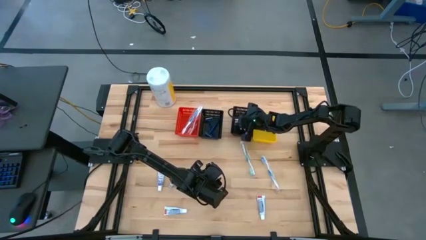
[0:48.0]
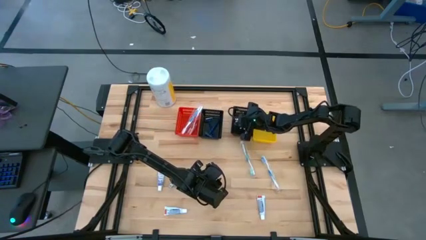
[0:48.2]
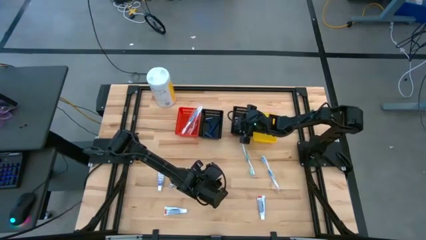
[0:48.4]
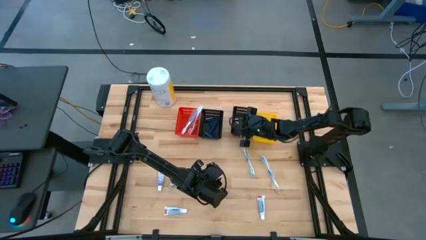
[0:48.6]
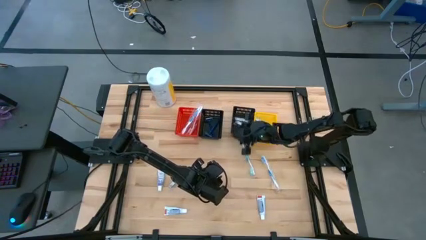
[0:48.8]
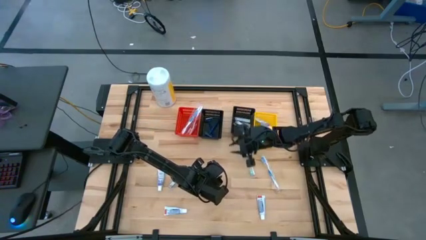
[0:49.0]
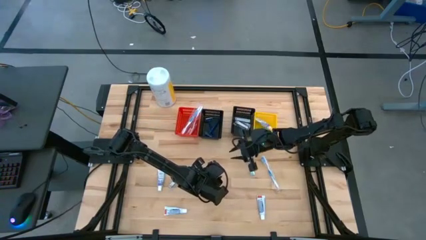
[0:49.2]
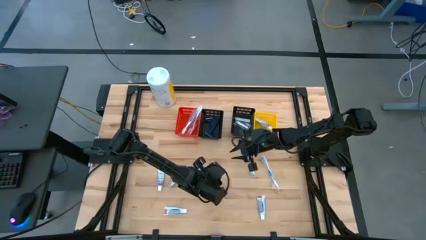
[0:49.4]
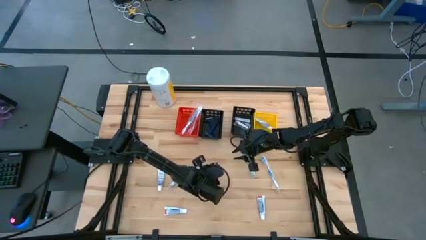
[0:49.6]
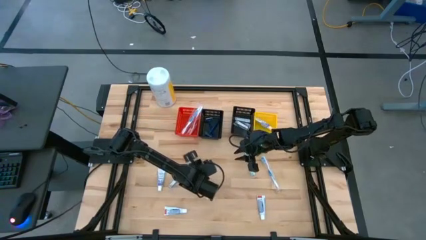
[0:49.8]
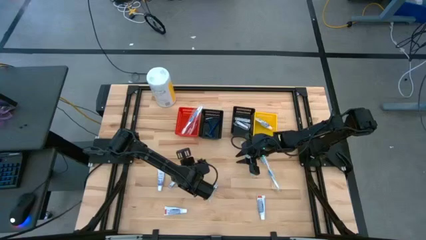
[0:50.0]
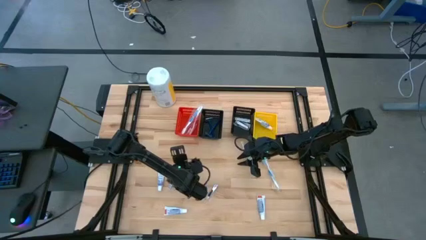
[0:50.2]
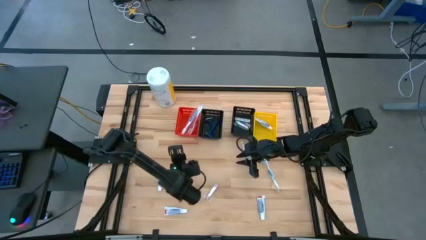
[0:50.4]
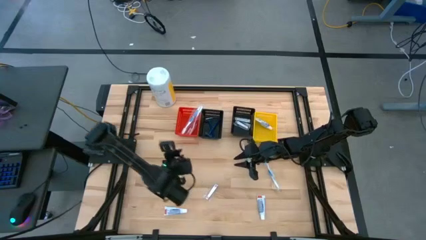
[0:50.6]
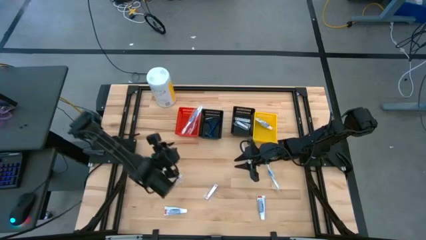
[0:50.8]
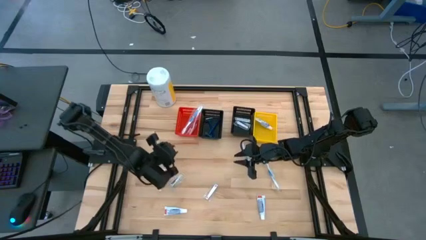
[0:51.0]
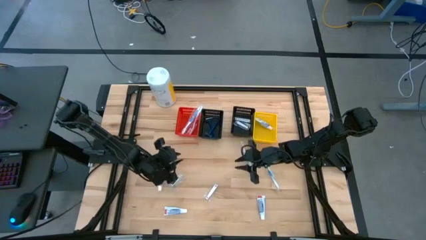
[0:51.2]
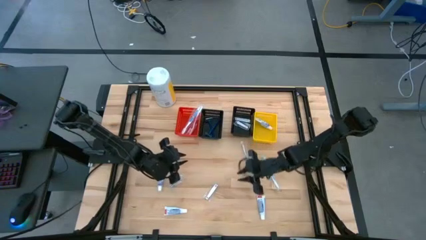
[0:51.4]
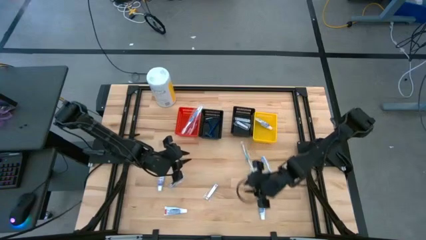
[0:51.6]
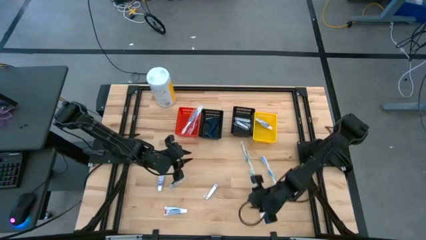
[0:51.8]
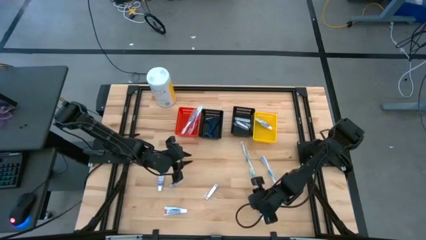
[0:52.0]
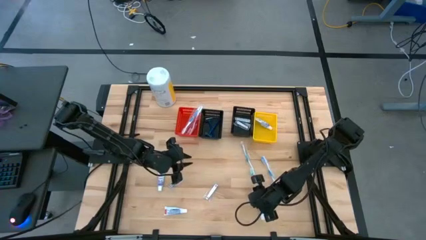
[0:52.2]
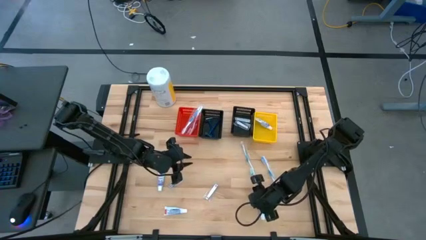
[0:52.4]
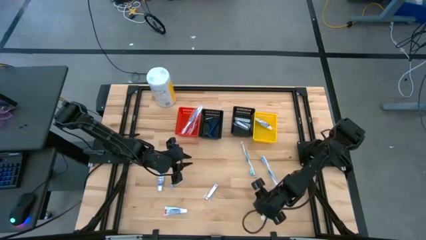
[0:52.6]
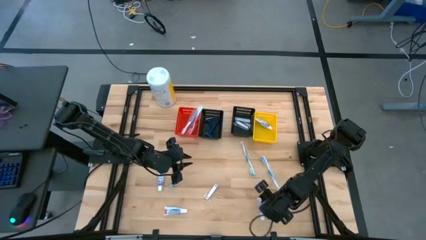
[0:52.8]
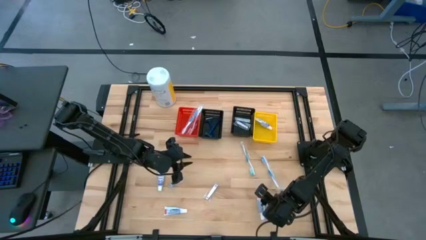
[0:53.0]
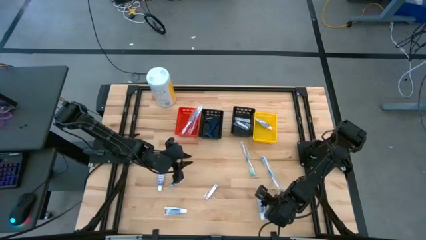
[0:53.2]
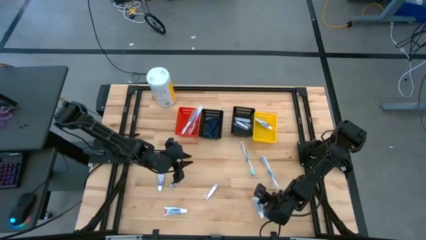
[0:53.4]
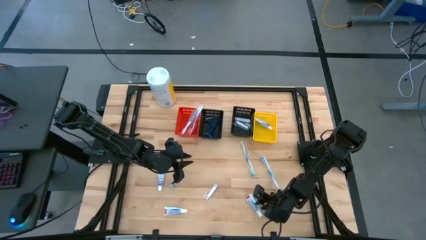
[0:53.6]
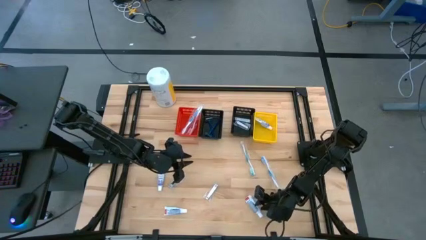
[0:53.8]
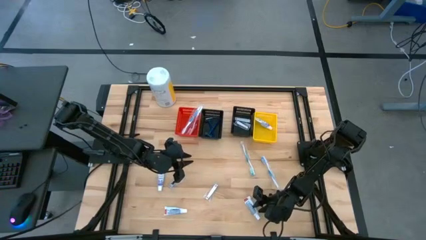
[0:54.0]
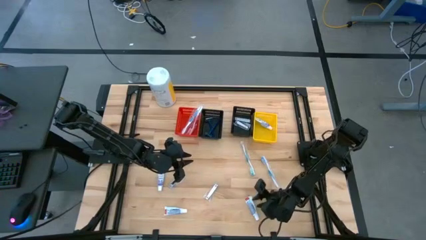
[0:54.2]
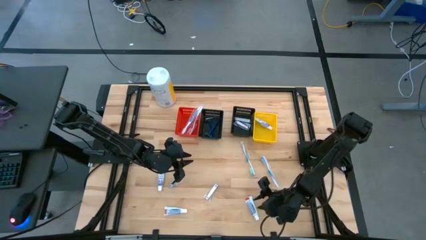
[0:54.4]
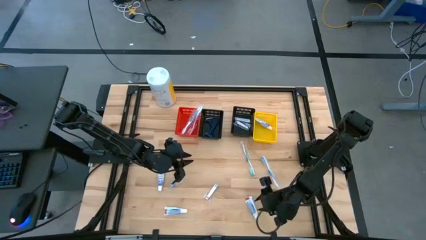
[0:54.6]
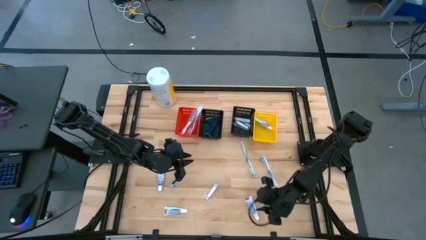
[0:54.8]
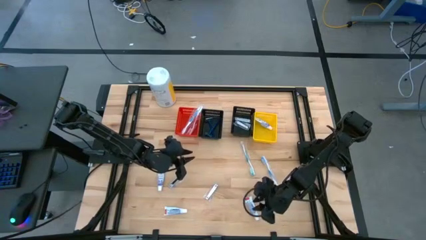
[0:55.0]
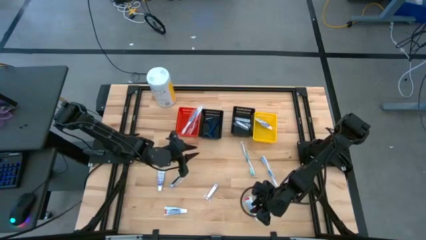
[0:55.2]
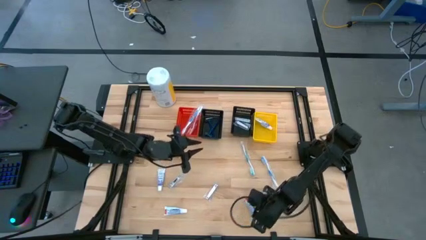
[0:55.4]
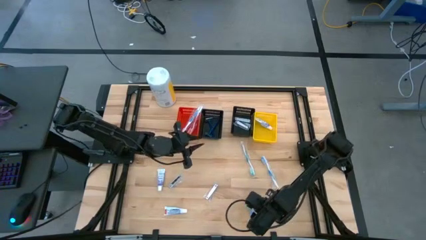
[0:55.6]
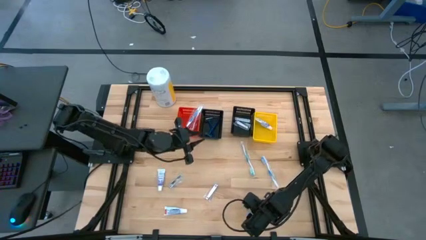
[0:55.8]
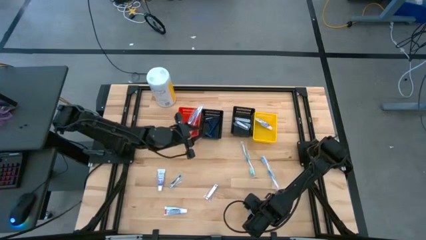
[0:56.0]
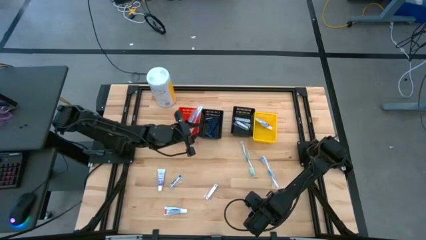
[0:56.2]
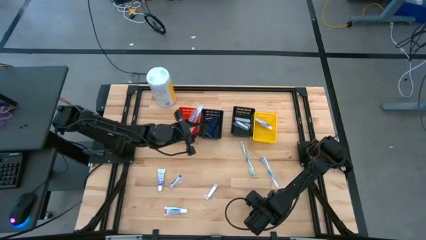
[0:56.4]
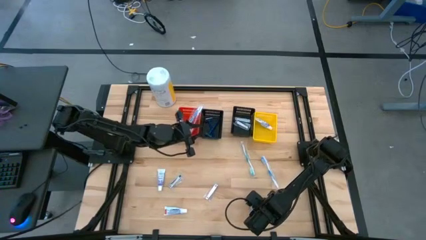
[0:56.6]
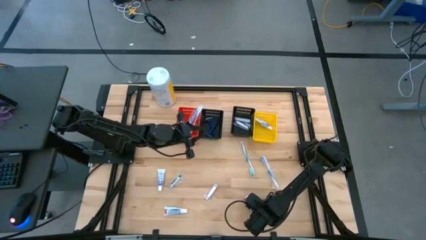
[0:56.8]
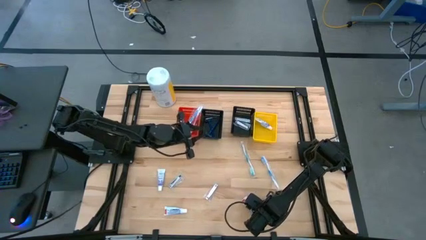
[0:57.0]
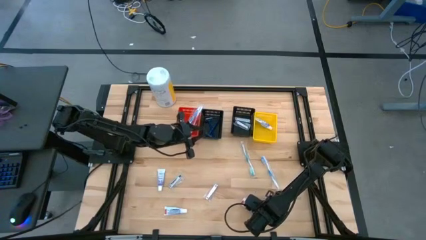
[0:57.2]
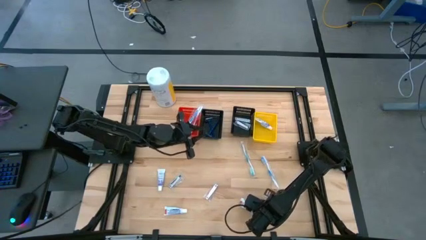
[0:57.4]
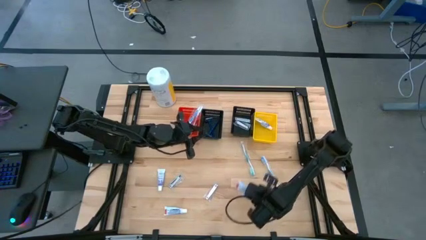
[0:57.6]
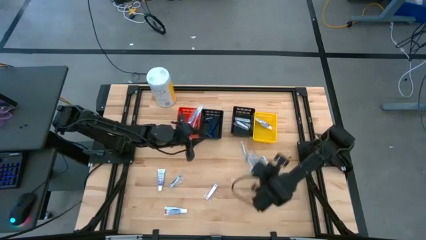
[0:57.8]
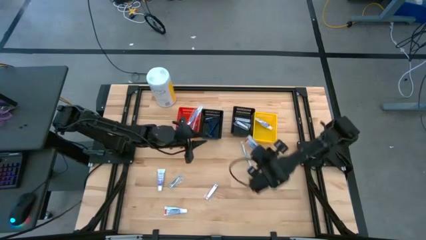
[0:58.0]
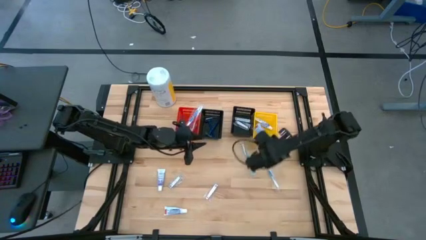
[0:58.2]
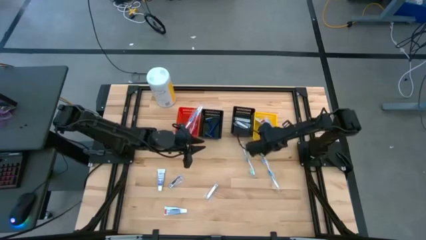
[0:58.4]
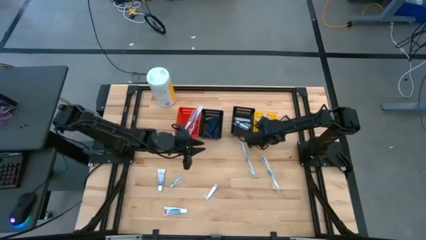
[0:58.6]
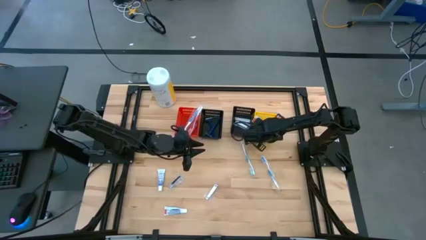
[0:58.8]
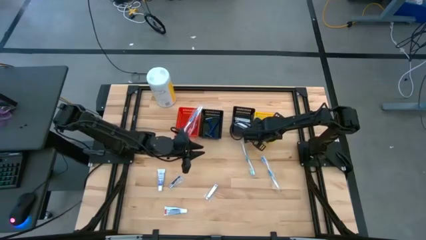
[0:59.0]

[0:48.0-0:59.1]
Task: Pick & Place Travel size toiletries
Put the white toothpaste into the yellow basket

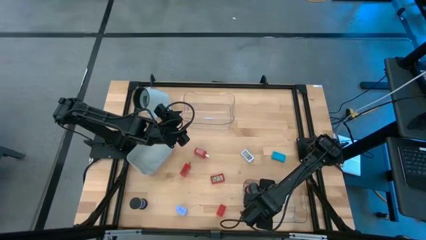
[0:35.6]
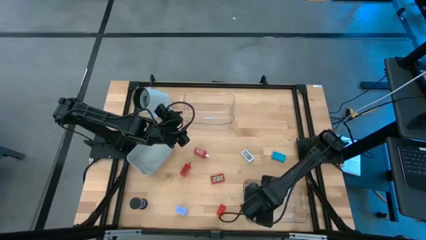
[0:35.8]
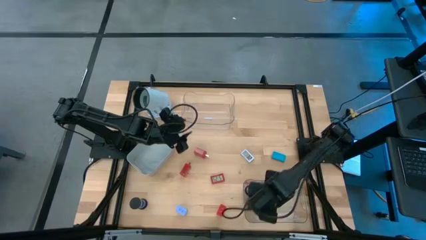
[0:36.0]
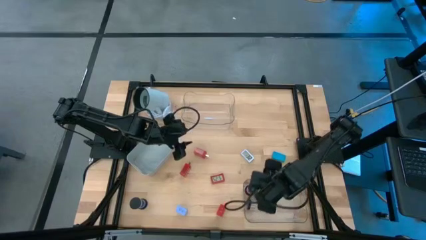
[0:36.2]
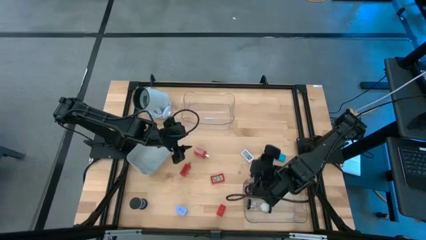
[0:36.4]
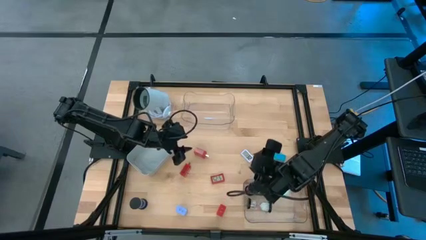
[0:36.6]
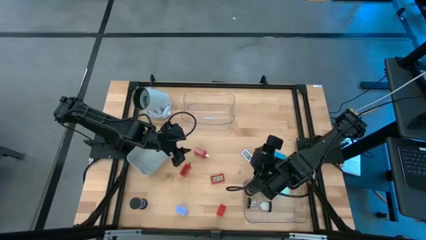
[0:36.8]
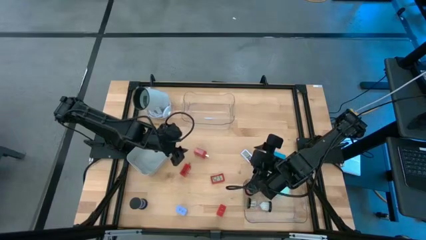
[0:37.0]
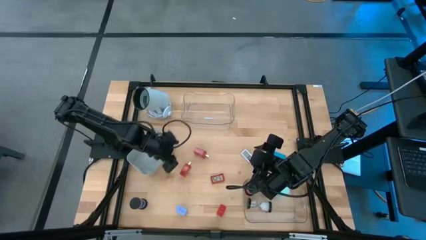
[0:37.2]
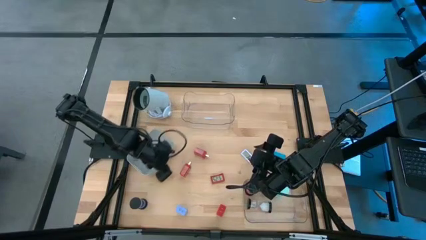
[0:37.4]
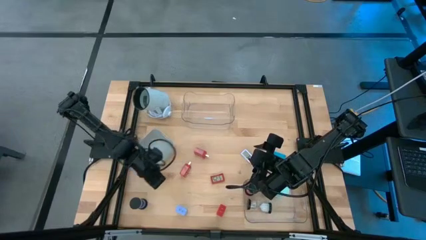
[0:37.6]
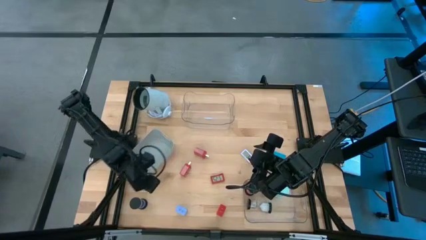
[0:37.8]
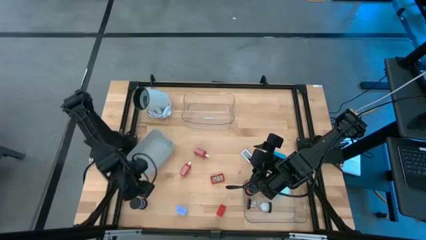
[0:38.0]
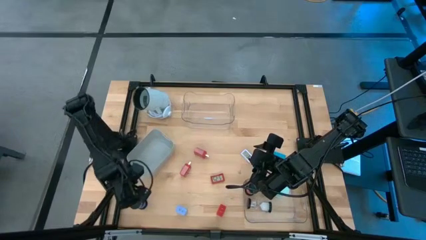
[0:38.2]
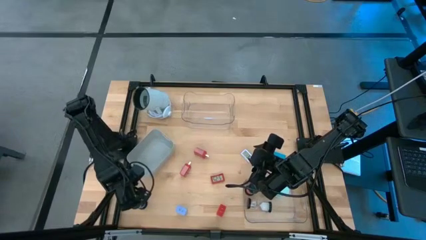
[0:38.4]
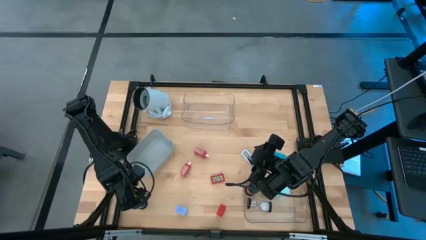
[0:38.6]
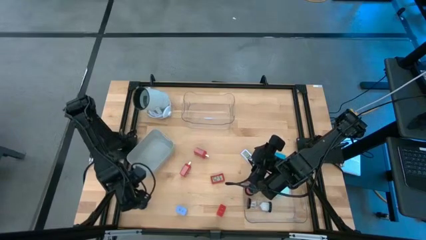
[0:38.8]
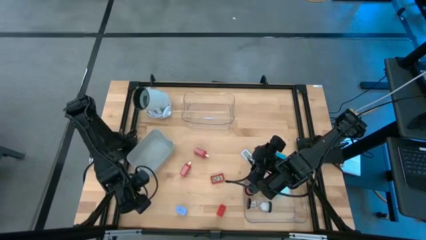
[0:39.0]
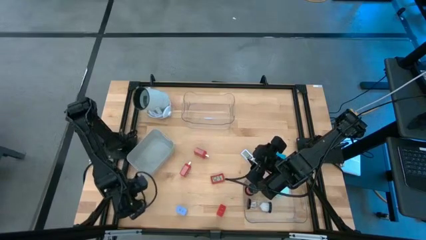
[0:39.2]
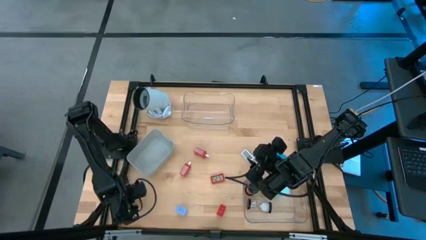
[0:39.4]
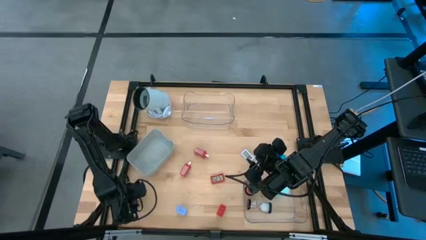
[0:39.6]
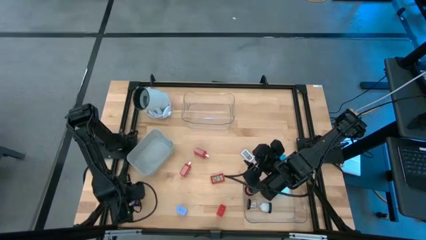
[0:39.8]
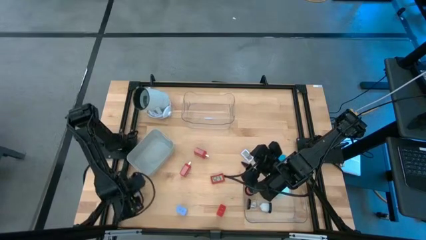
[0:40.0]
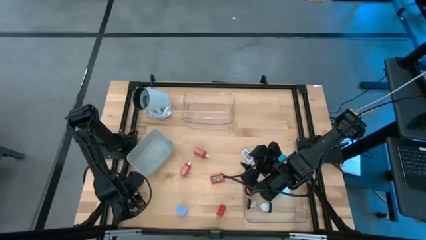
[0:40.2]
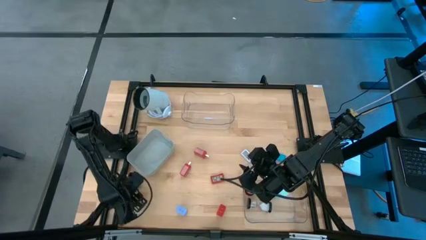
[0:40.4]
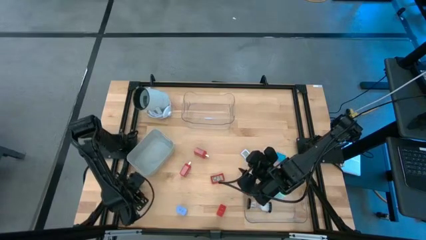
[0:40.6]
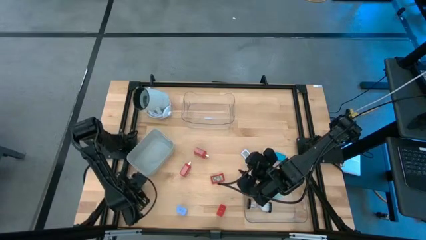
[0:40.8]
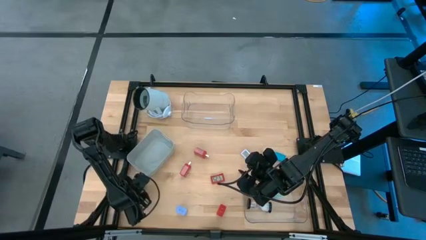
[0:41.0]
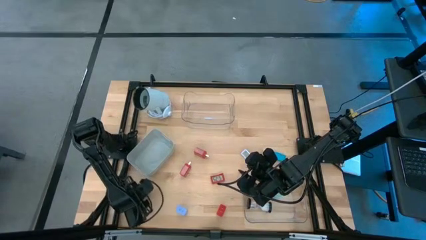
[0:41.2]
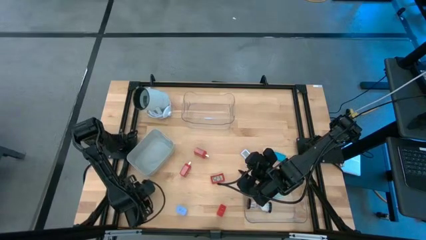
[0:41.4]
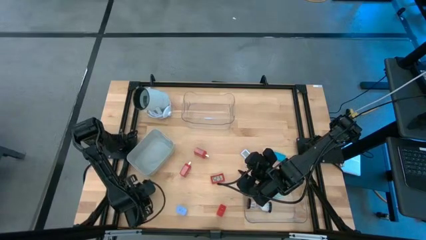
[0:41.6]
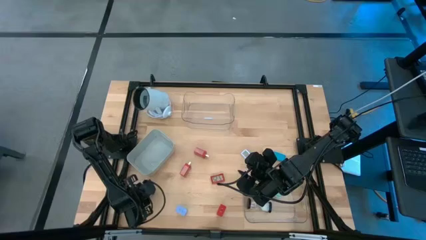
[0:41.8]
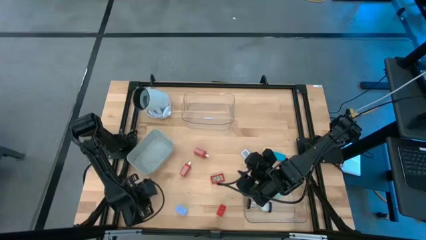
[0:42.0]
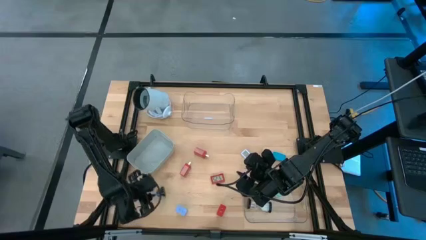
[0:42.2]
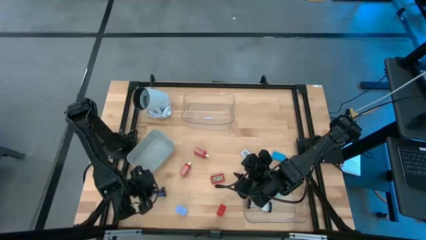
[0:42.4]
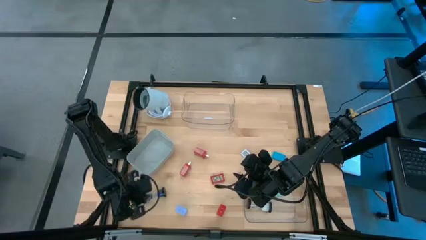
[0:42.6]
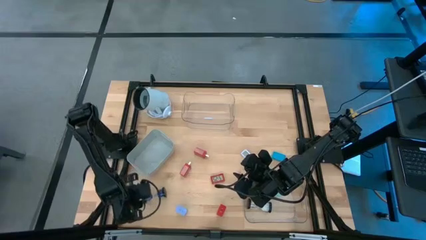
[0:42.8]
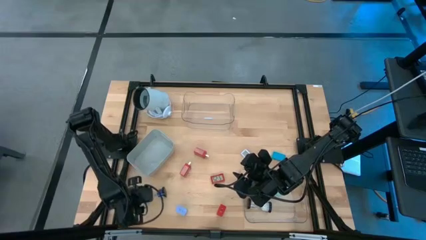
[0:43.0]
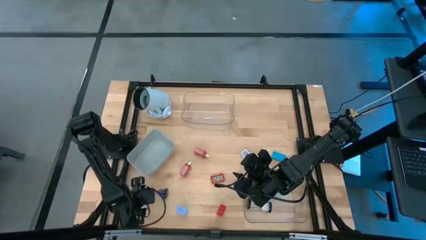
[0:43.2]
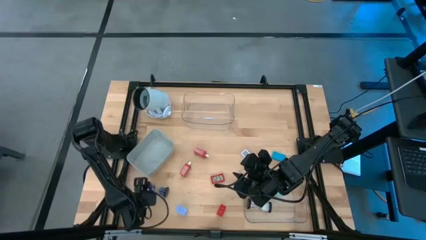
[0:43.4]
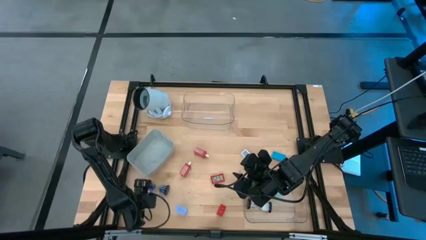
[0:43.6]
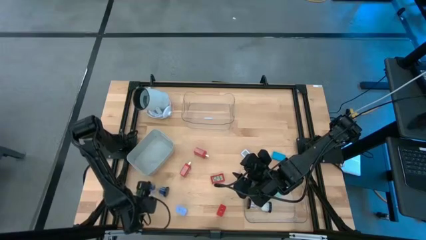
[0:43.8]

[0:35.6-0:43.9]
Task: Pick & Place Office items
Put the dark blue hourglass into the bottom transparent bin
